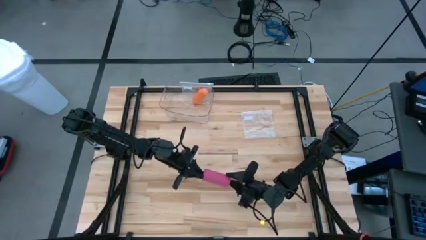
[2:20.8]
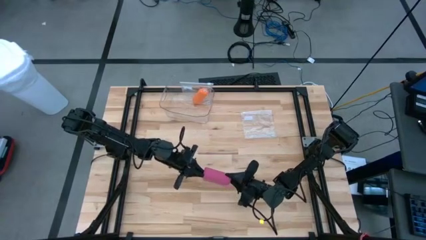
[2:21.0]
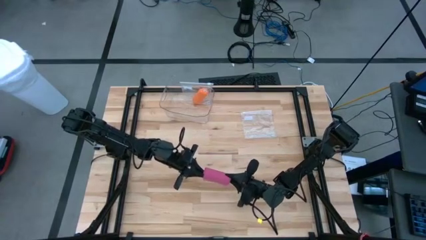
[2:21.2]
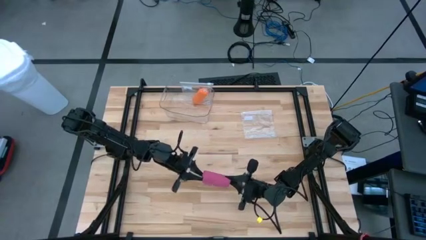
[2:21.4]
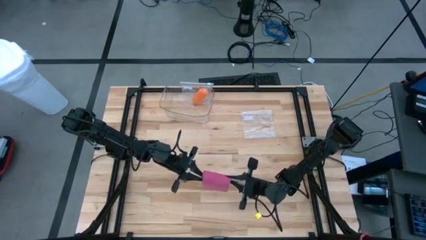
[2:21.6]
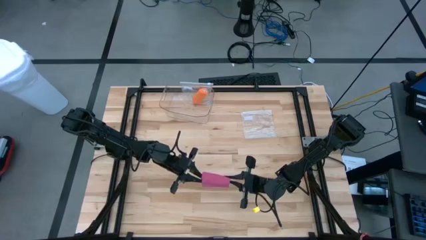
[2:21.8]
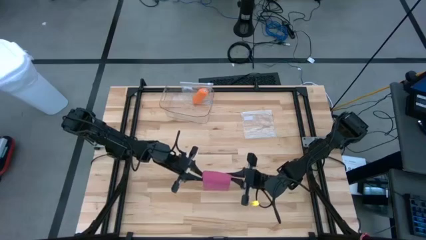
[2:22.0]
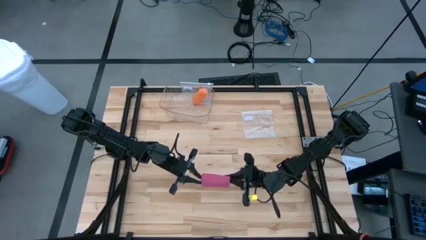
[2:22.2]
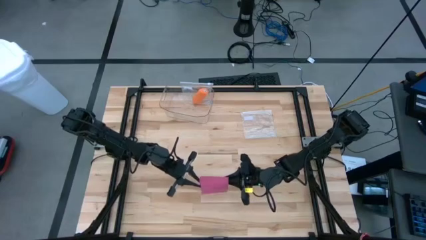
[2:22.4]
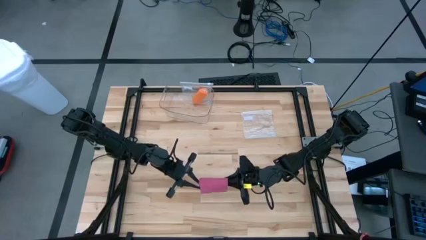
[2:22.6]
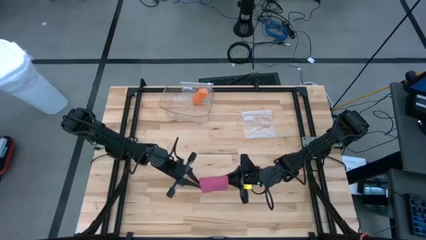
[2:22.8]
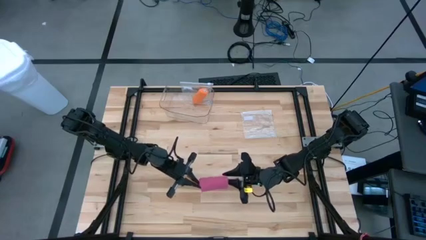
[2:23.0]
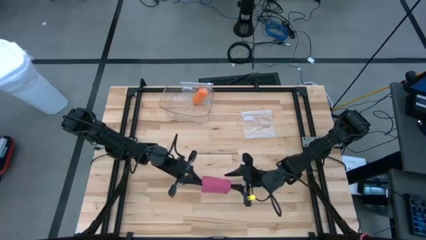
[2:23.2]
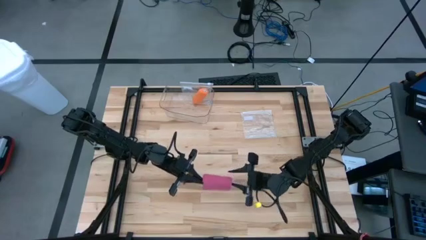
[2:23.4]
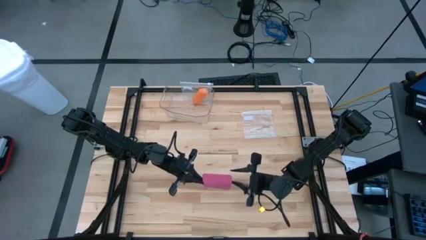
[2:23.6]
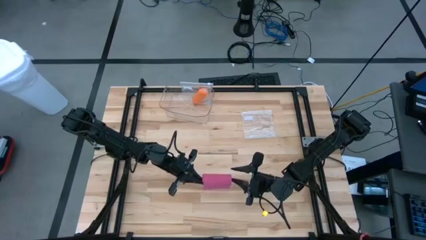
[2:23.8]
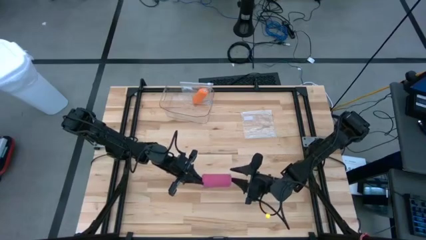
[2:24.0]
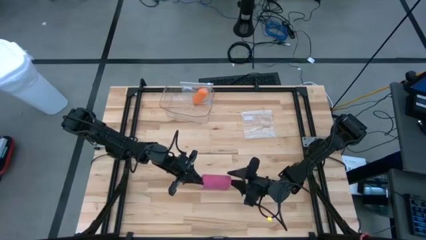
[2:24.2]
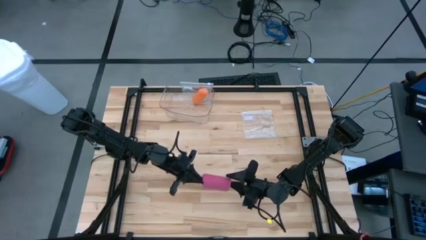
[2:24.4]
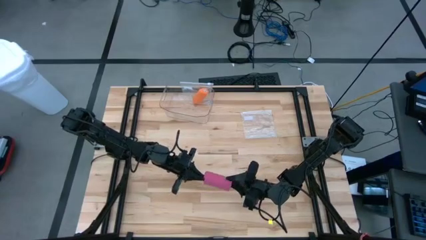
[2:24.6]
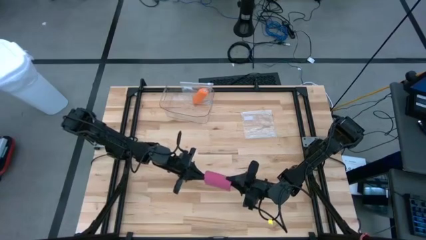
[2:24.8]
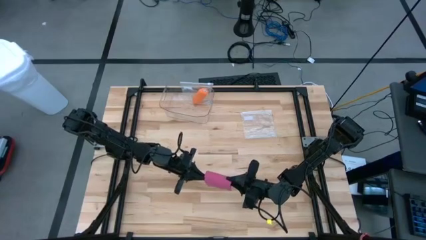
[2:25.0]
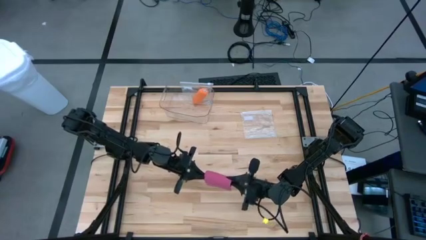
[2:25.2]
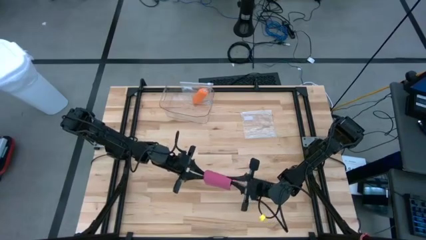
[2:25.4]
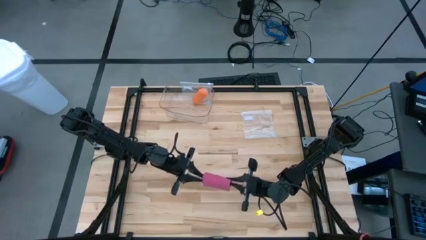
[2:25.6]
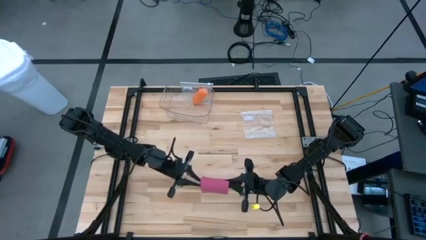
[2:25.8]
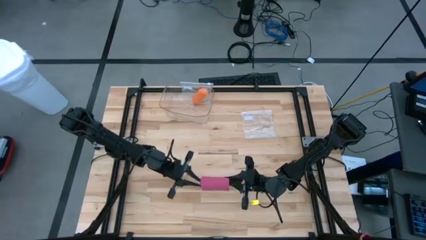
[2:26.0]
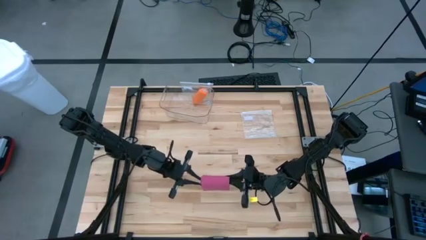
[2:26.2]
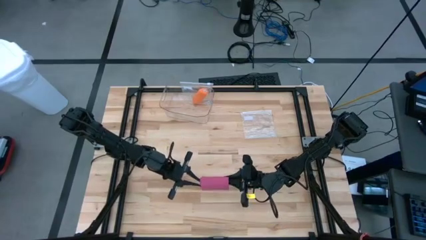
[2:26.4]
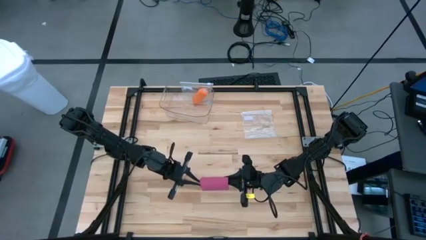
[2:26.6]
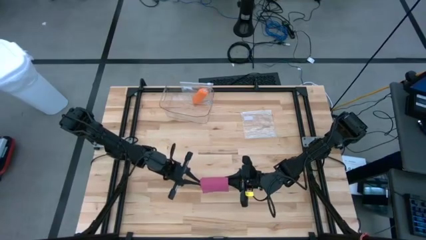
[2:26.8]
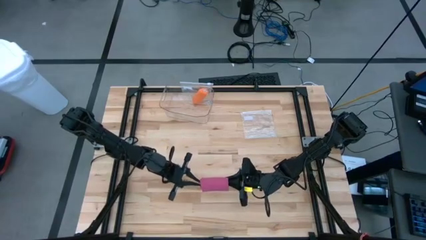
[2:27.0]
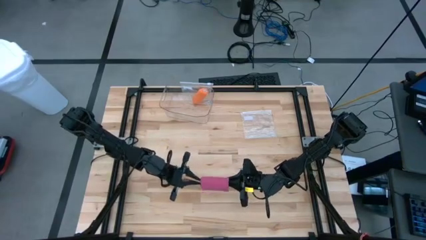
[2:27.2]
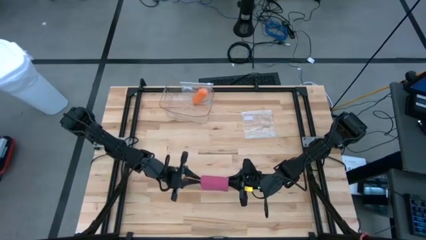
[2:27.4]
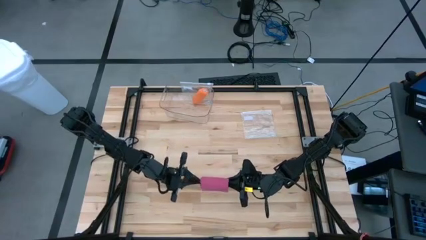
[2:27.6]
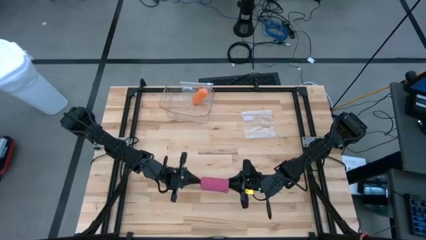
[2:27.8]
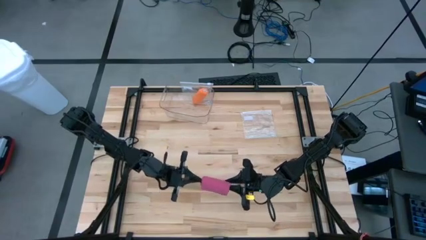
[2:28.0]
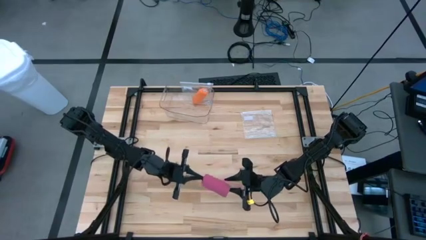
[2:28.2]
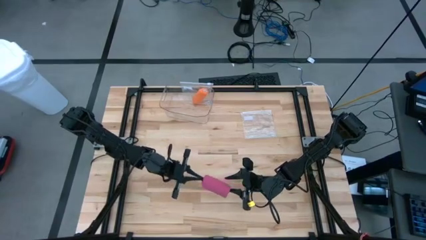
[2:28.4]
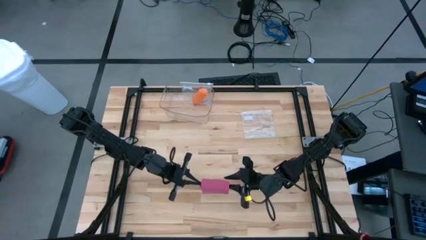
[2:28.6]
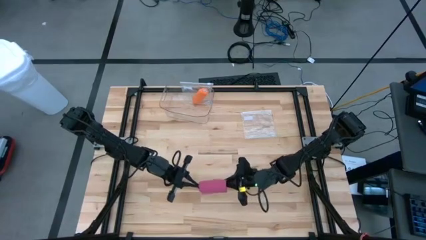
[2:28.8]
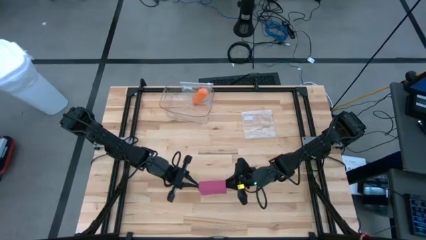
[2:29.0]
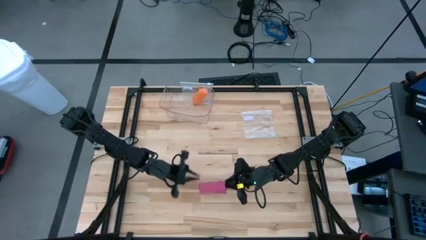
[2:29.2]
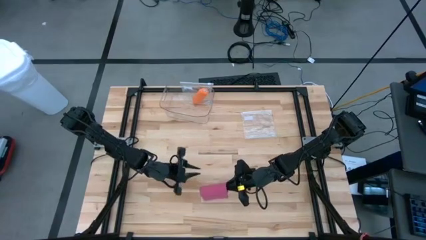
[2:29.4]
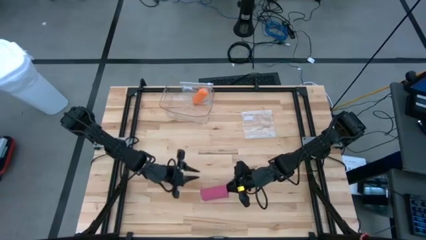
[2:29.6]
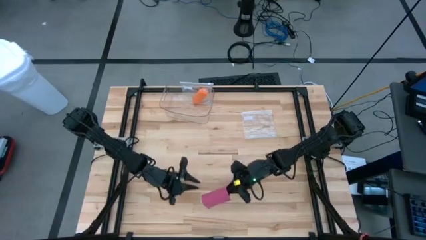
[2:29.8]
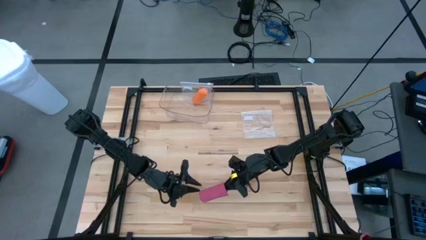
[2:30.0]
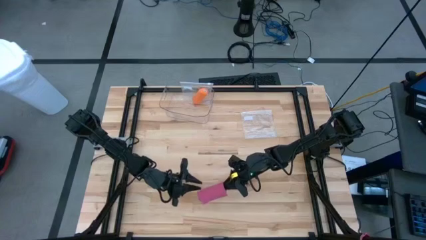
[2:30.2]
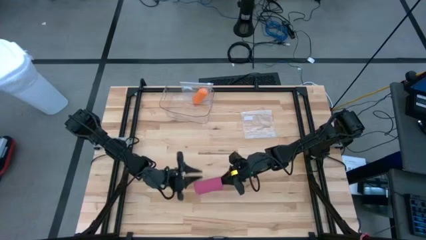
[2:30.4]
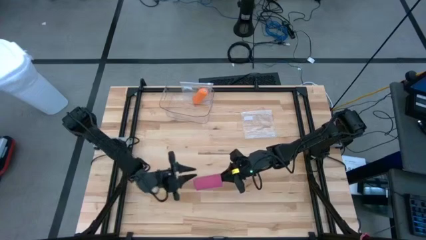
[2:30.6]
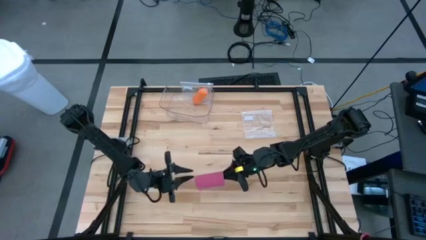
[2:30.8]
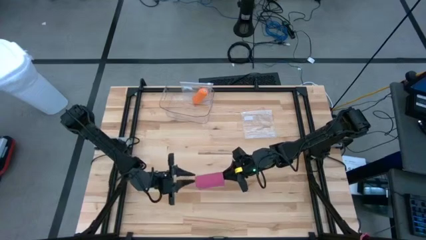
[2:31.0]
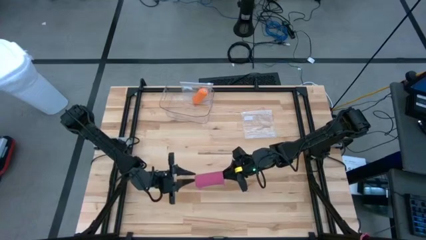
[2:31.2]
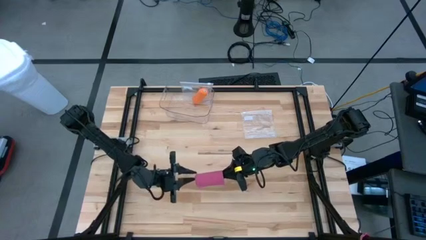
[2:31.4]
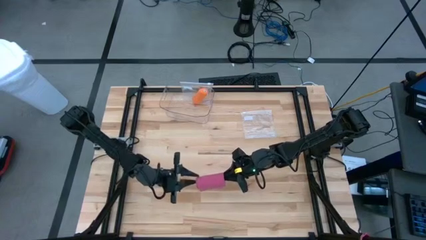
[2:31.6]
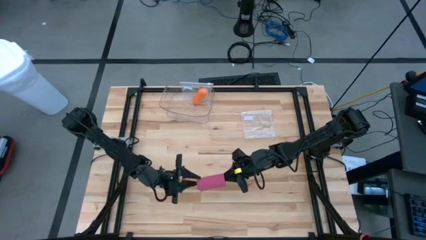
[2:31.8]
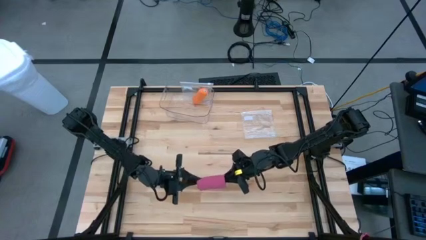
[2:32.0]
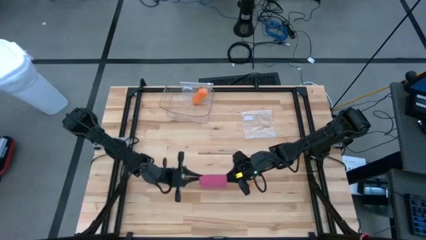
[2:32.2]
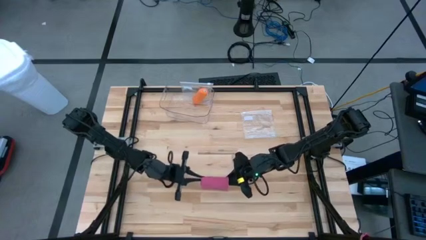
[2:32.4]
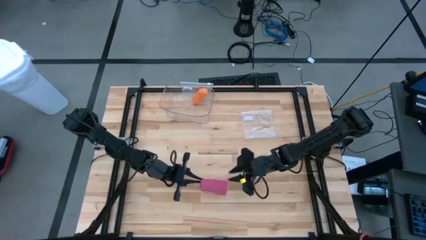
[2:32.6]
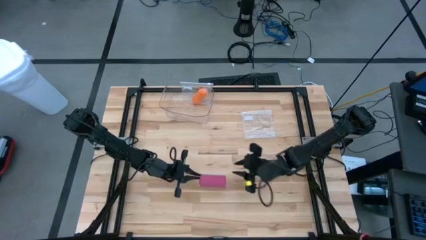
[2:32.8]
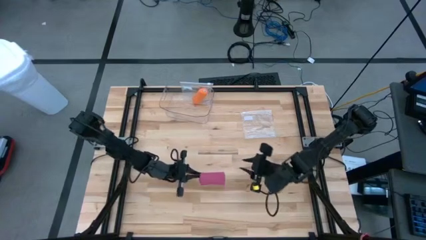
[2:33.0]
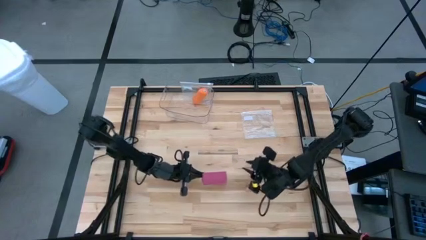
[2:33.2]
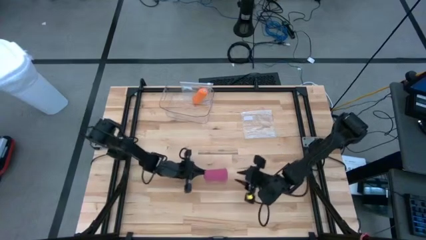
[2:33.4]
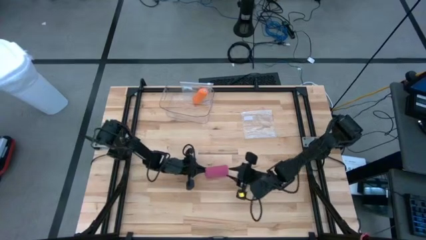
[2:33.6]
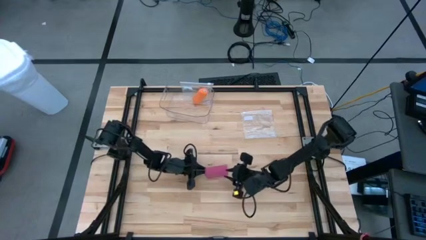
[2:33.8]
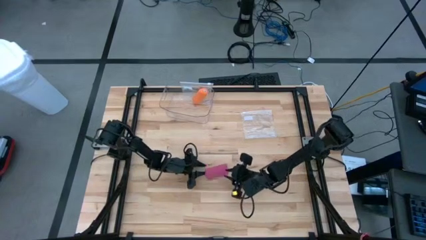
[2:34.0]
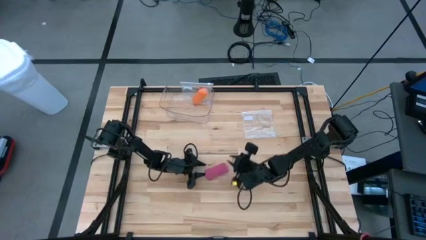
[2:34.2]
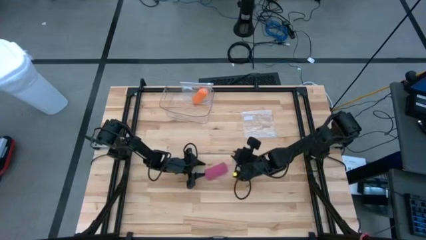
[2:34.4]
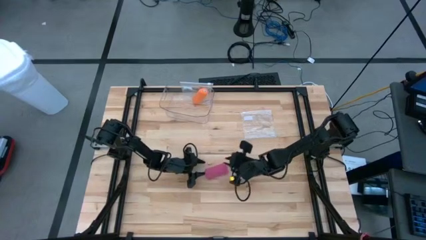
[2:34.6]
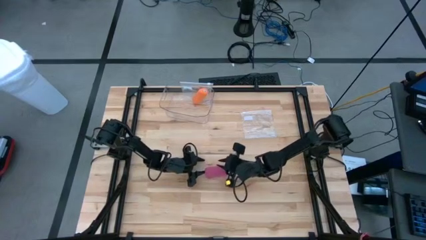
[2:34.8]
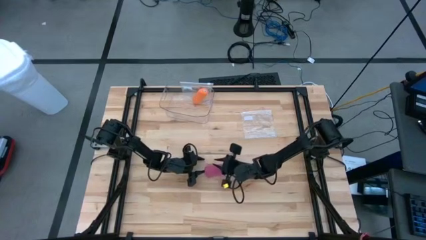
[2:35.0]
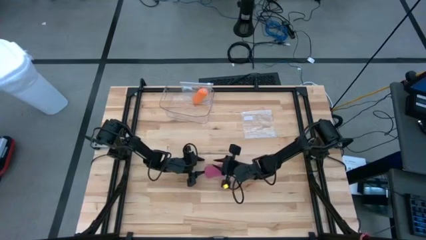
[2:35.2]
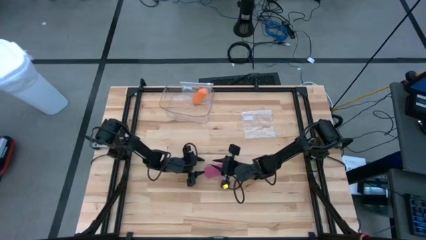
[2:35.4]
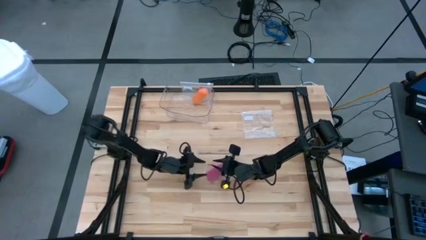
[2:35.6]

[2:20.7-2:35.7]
Task: Roll bandage
Roll the pink bandage
